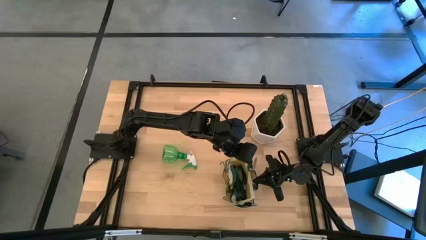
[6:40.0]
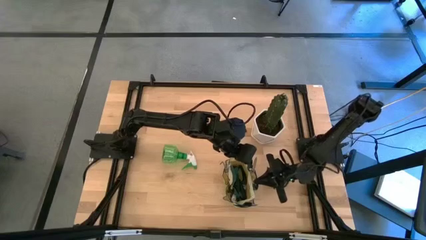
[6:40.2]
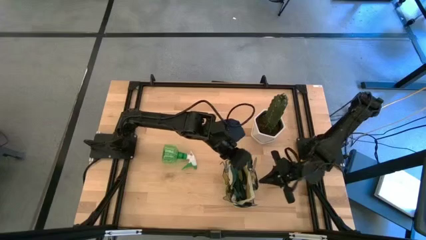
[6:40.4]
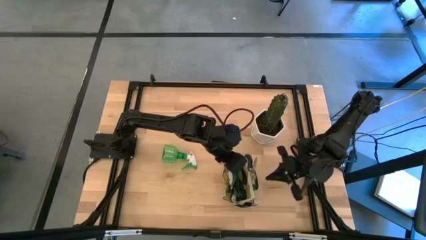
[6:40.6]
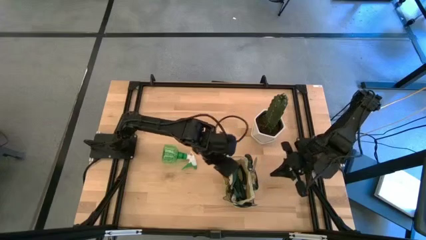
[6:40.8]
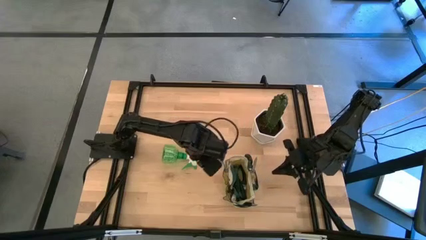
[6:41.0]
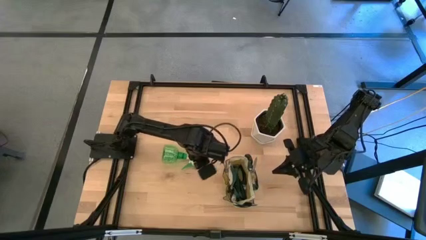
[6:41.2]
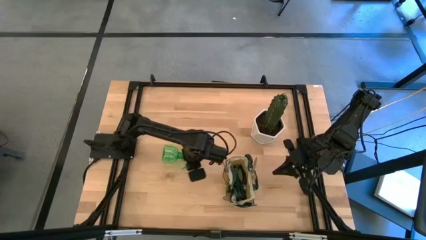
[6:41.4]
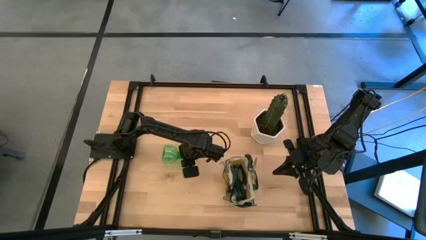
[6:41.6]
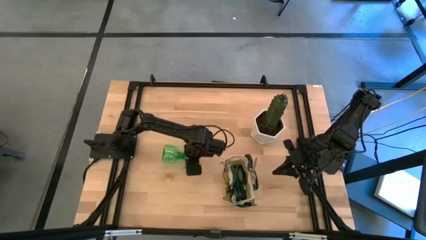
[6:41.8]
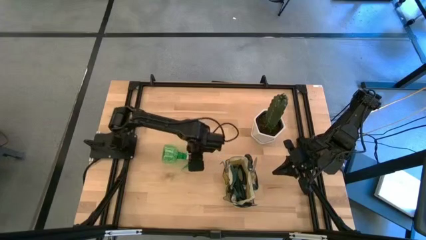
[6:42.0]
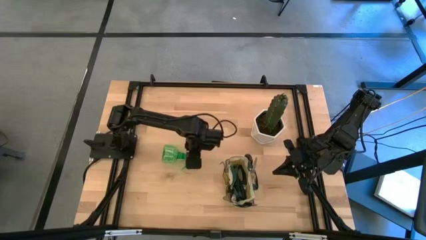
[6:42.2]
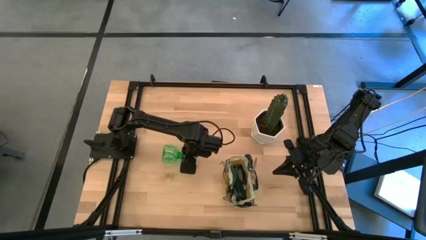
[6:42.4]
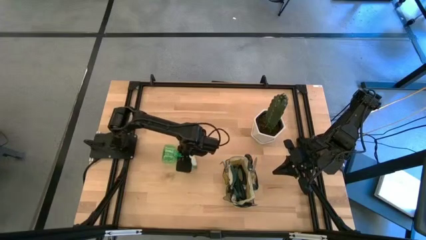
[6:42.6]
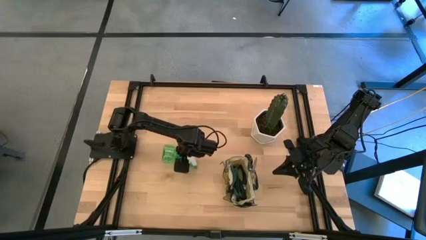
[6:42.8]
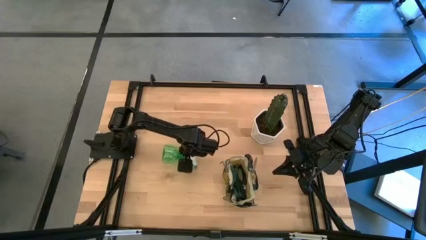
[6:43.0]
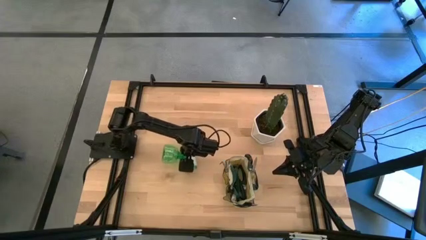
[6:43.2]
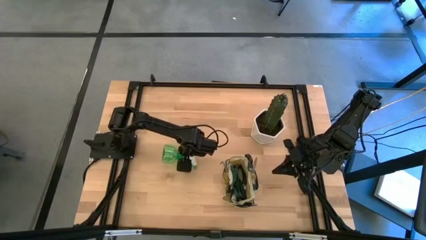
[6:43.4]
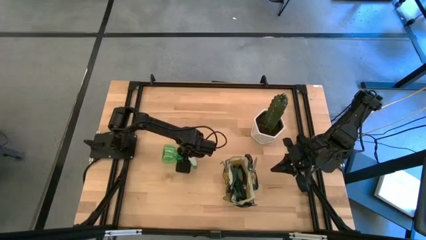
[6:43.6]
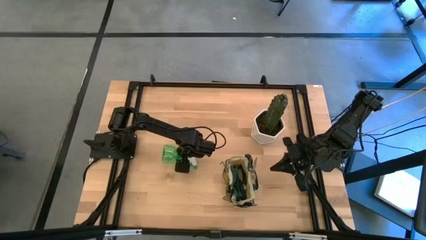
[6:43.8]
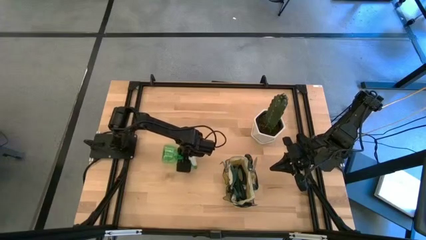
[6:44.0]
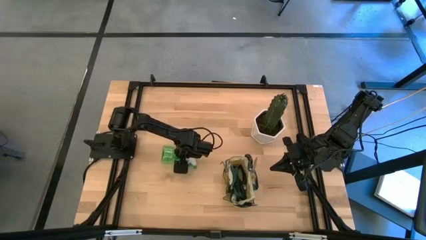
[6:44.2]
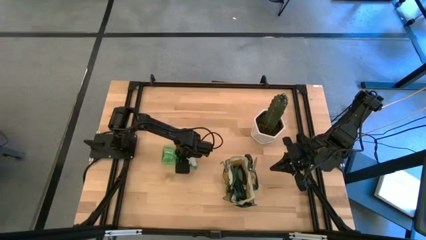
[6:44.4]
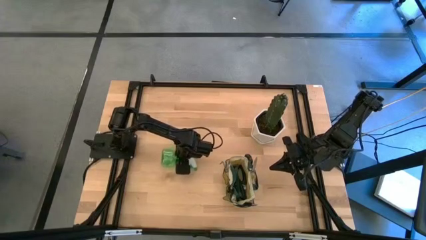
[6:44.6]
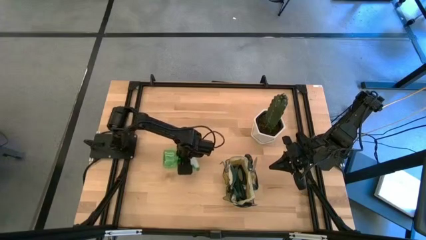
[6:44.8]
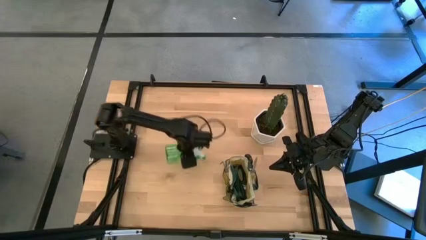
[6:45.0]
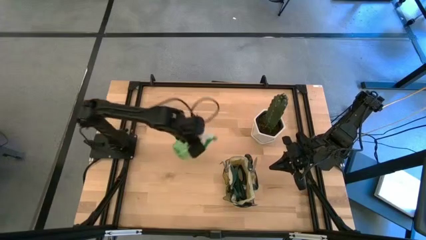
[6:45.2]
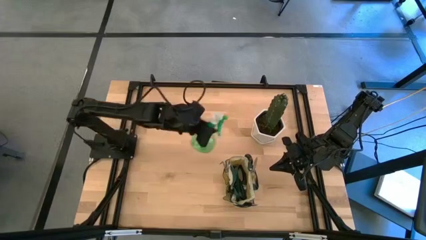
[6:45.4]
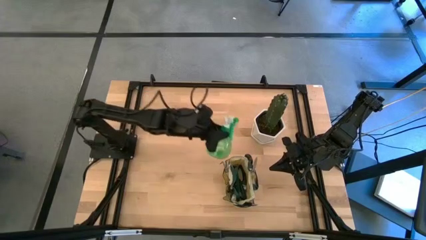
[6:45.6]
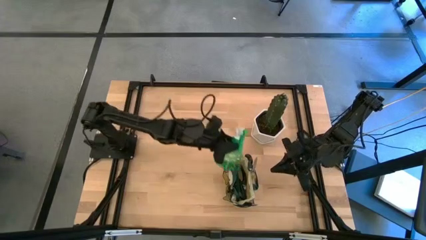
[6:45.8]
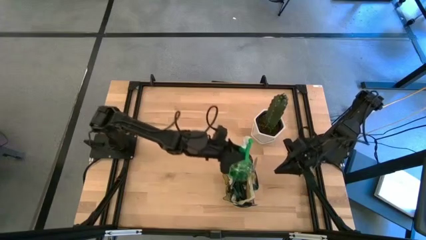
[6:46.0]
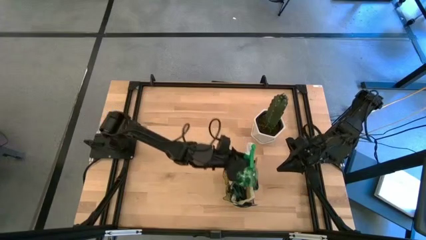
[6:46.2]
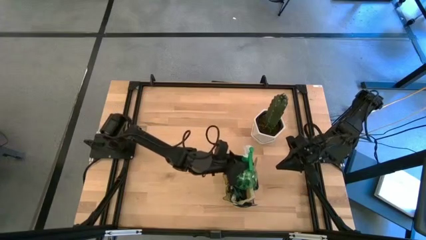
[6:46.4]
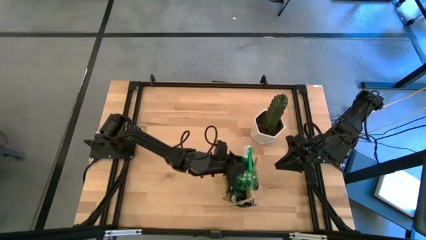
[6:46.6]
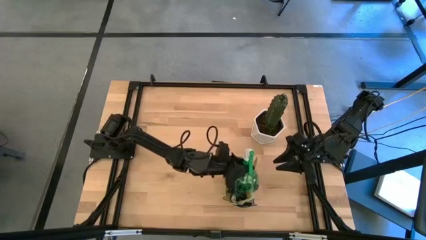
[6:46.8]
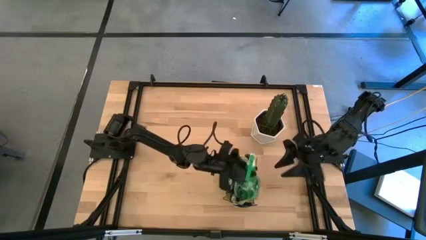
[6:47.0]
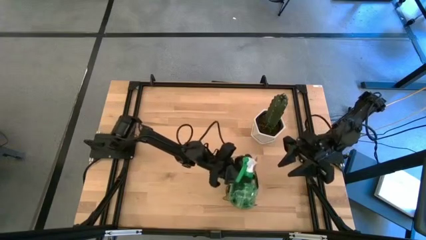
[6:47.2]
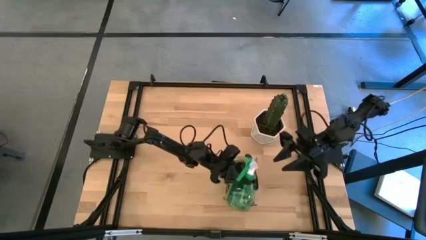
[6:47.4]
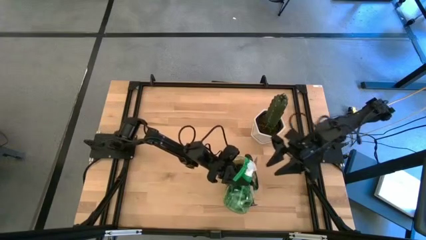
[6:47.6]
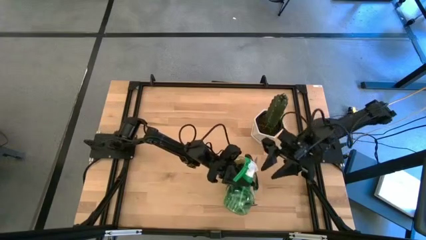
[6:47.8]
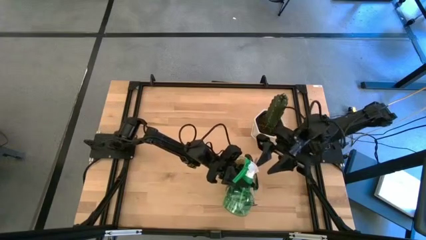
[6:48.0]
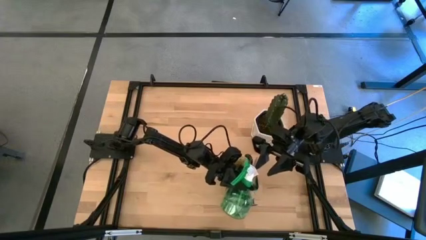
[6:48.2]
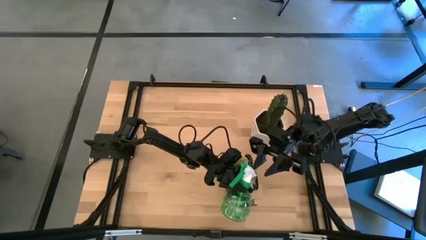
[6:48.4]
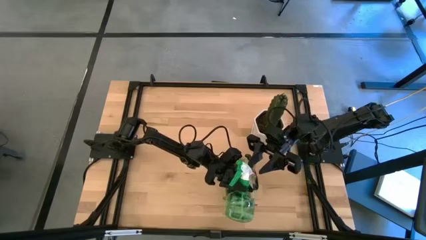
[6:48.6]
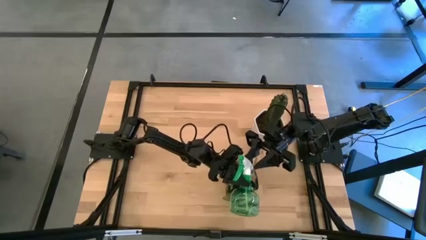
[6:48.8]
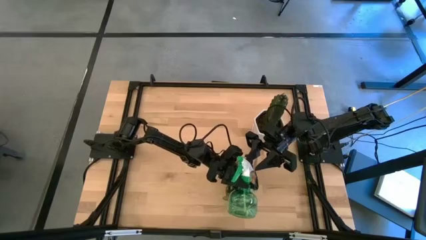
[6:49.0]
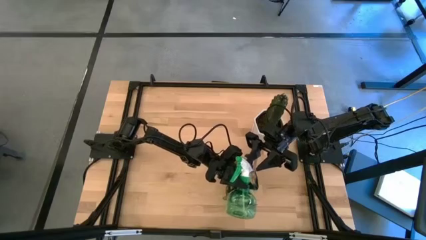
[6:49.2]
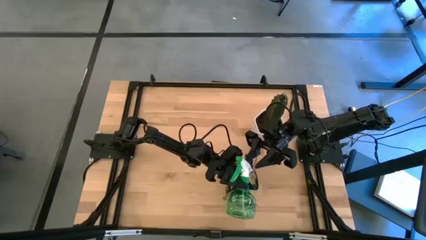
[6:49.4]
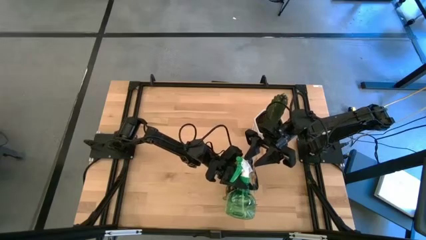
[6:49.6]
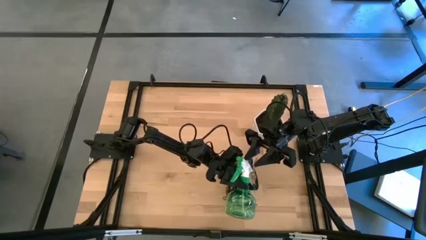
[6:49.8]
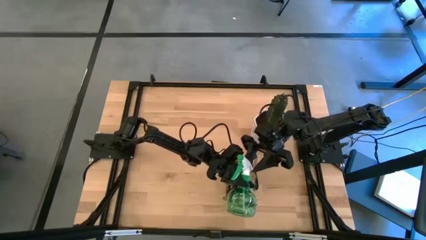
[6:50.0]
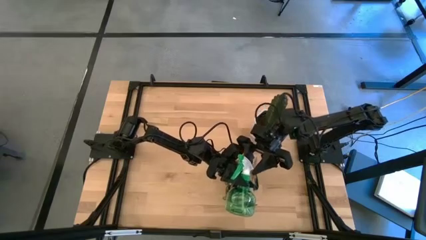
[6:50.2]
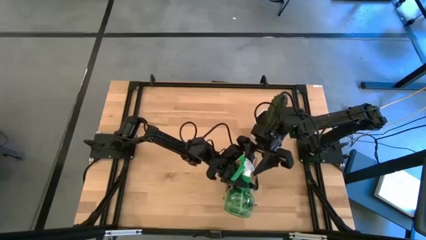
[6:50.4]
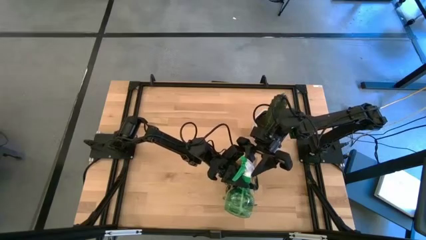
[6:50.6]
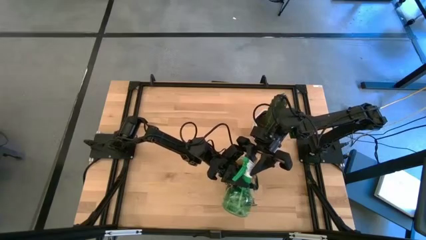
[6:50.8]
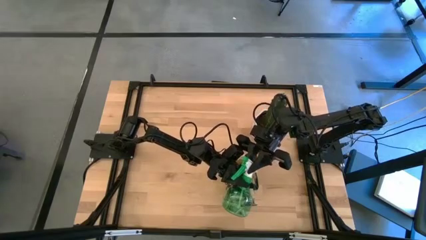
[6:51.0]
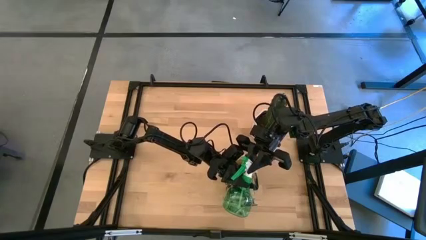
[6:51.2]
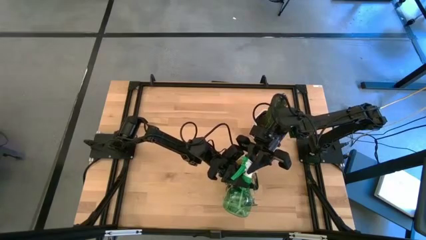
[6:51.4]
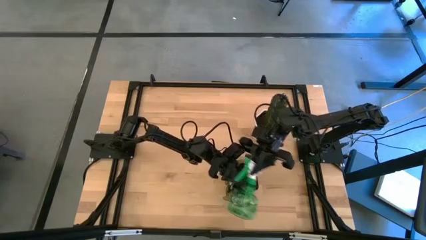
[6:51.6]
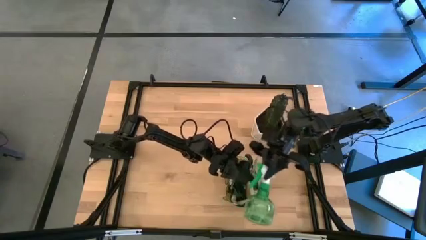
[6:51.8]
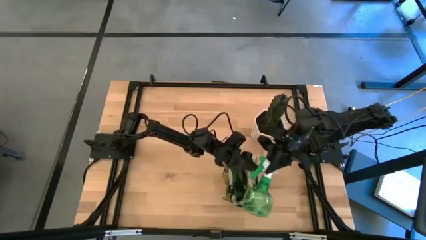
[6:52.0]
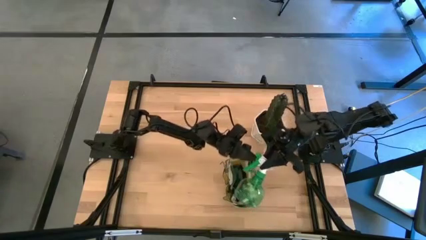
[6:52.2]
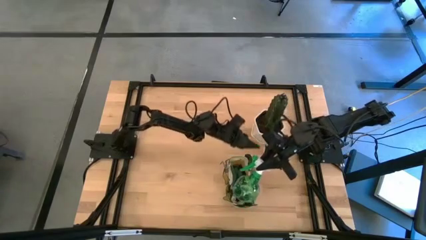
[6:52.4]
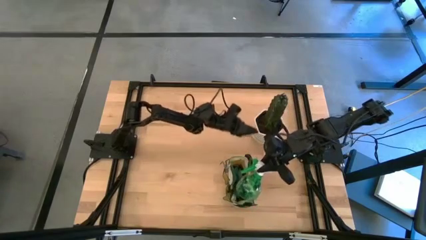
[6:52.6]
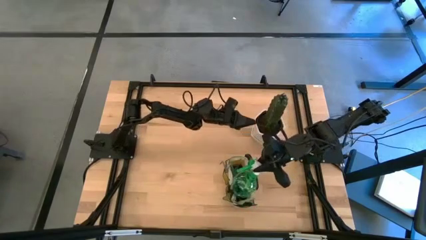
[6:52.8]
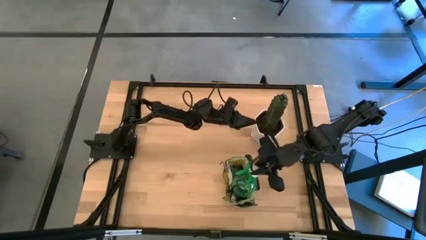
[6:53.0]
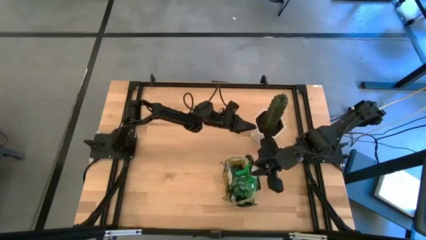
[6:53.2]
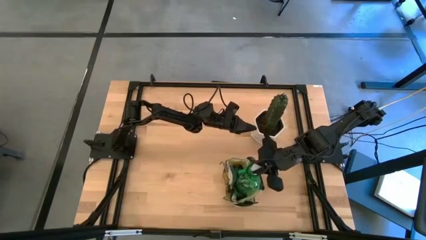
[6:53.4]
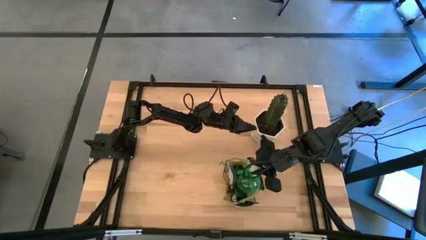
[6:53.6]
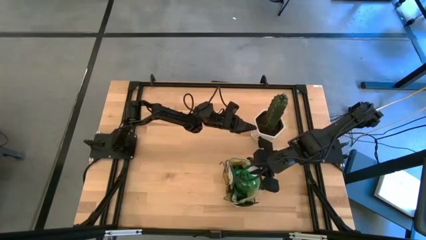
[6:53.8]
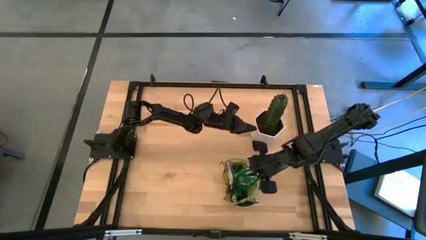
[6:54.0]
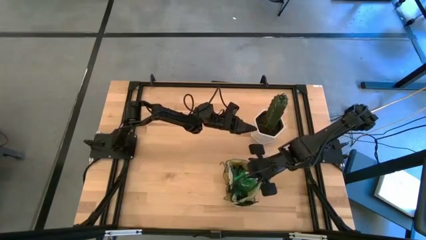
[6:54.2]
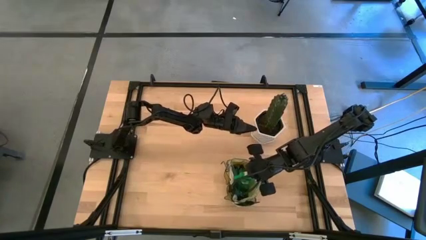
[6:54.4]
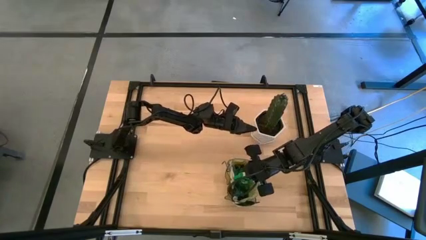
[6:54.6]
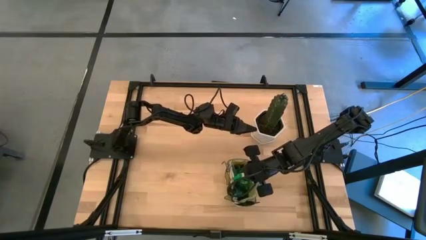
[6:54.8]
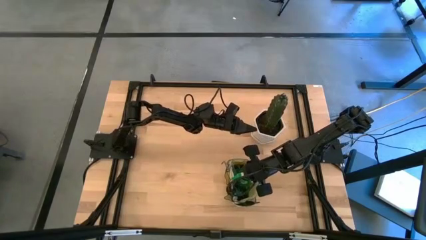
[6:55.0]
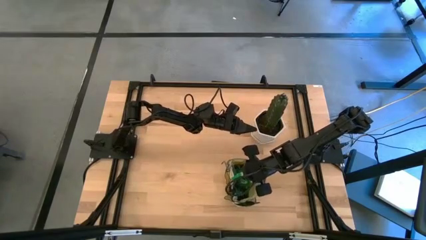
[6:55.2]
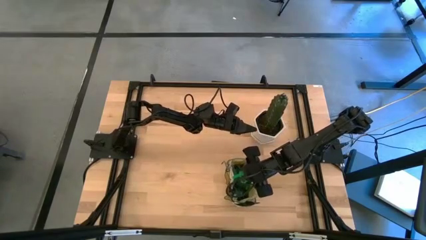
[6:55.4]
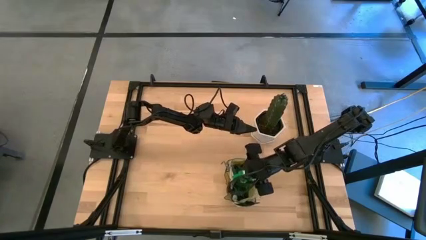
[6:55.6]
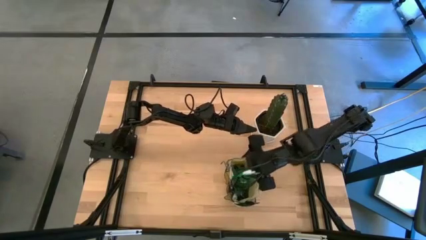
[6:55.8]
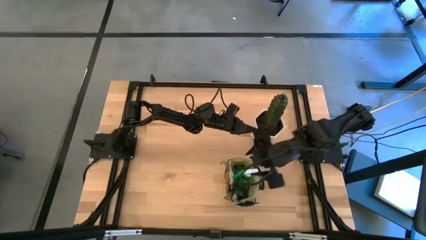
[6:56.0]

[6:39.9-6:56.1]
Task: Pick & Place Garden tools in Gardening bag
Put the green spray bottle into the white bag
